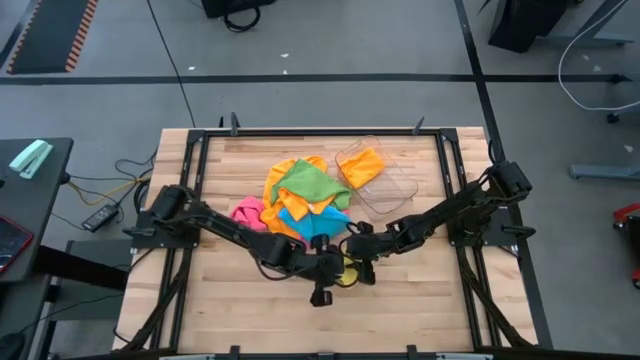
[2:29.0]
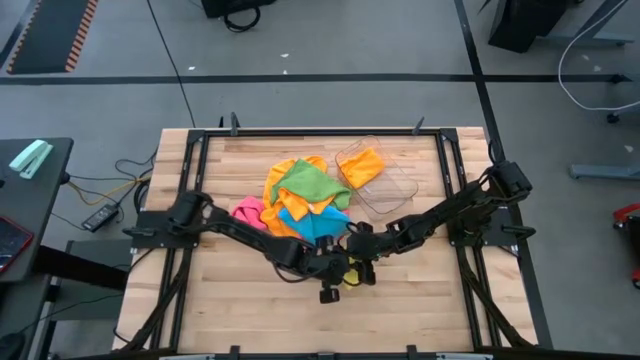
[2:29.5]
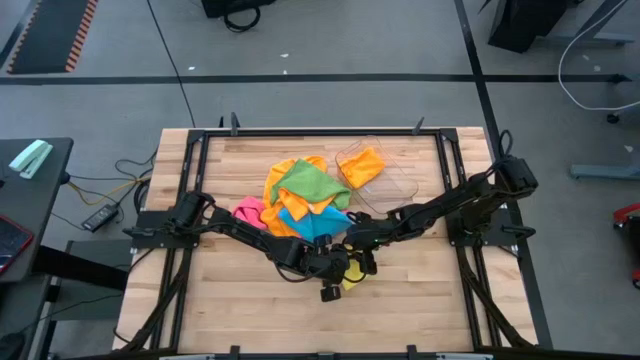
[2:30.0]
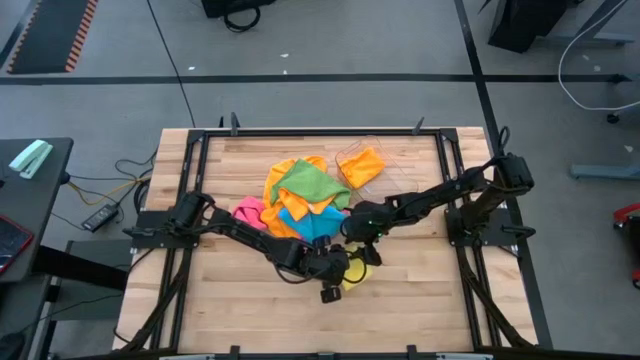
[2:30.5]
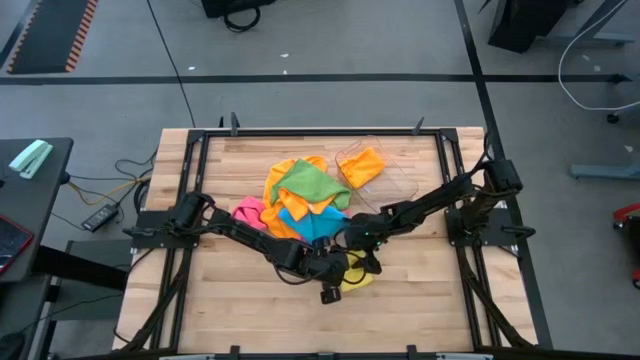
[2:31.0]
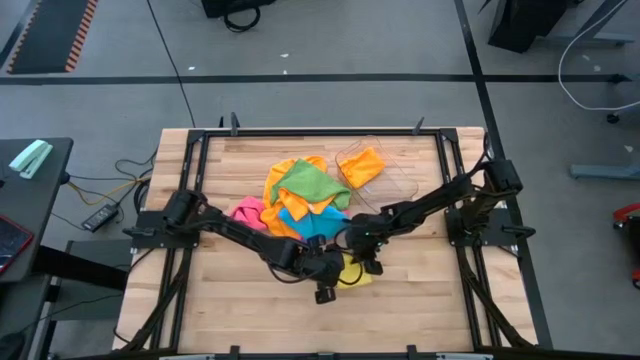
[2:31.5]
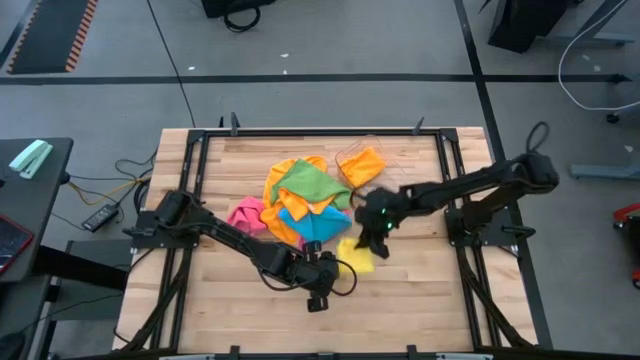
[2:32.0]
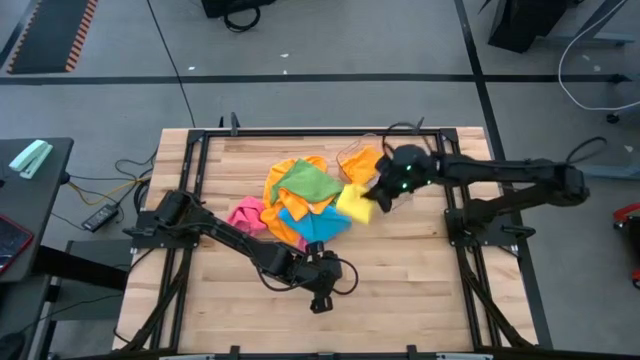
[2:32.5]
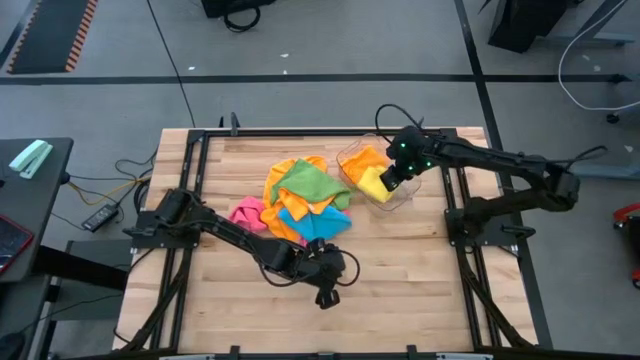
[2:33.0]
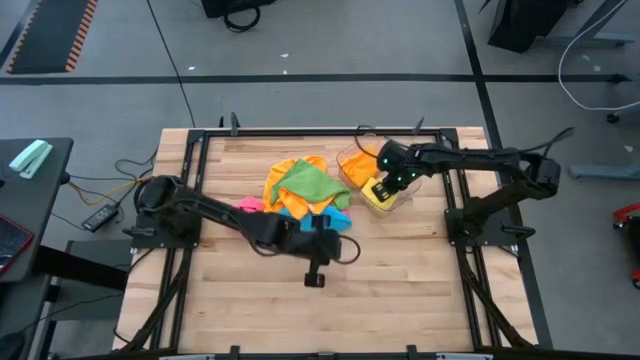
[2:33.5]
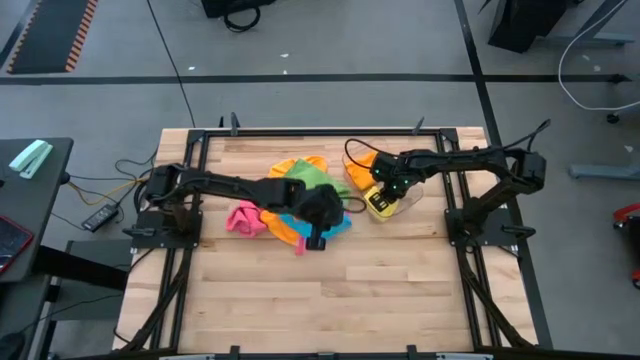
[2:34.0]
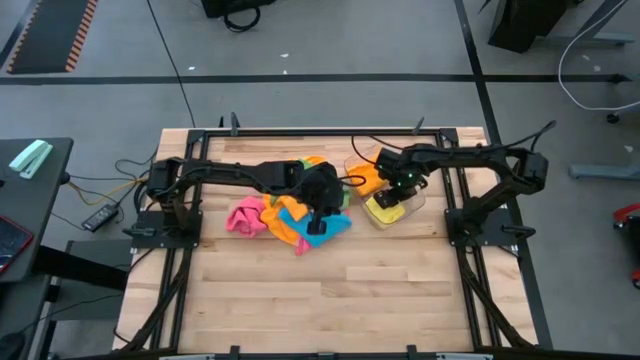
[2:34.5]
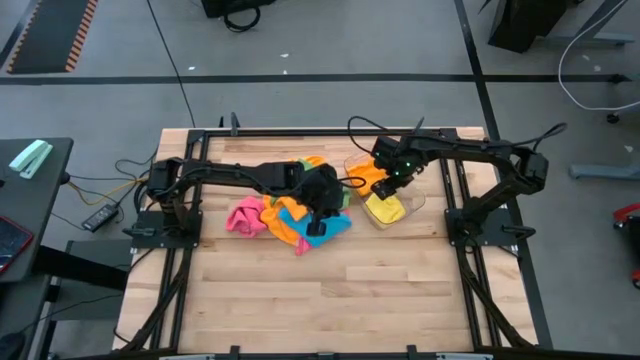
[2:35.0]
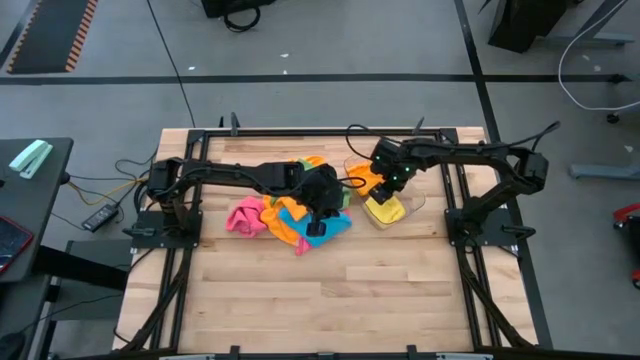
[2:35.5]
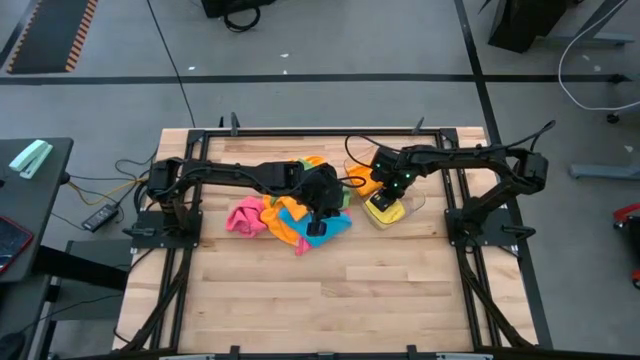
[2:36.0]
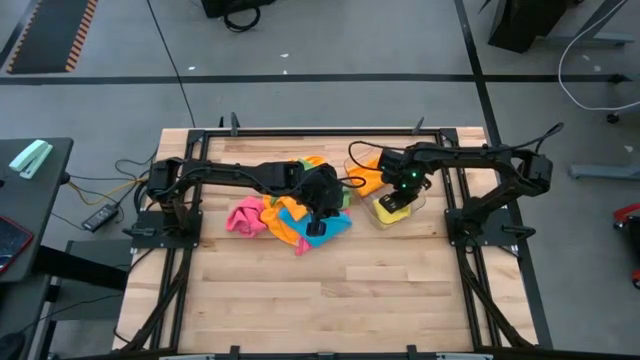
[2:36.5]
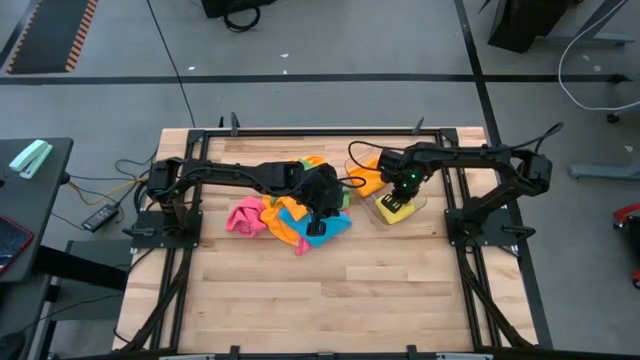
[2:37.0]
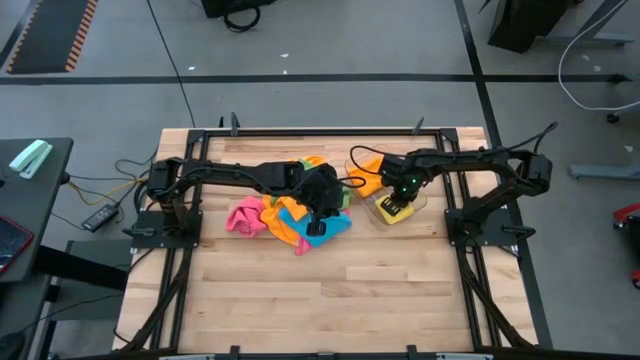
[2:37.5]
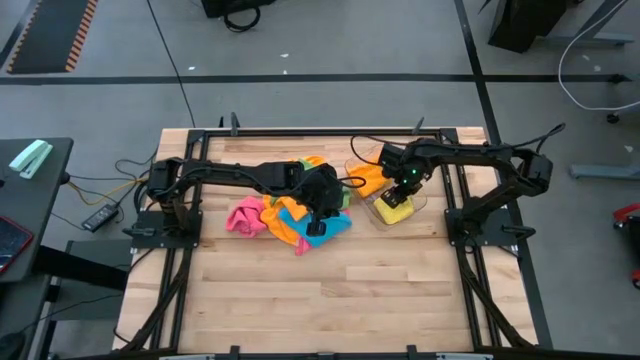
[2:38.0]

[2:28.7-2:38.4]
Task: Fold microfiber towels
Put the yellow towel into the transparent bin

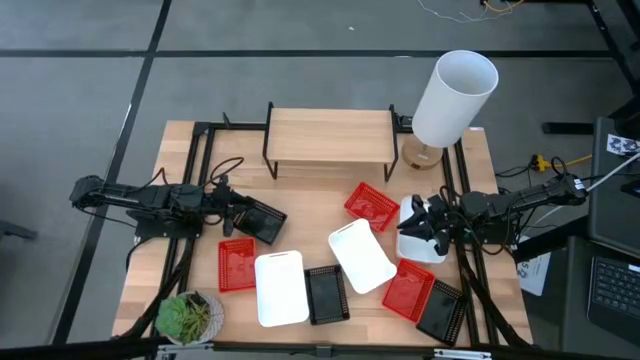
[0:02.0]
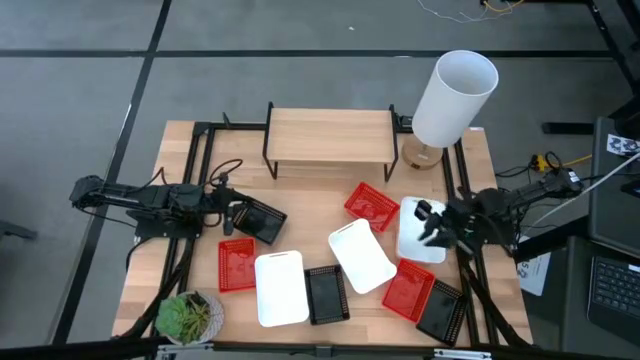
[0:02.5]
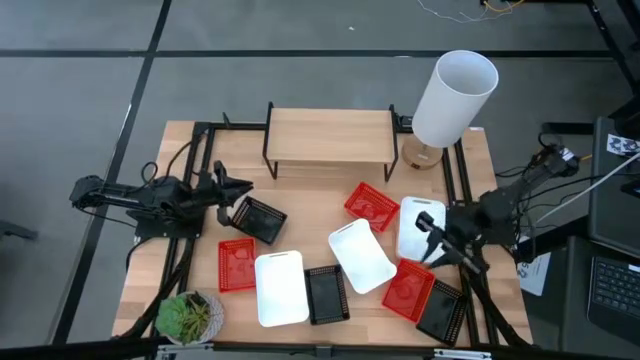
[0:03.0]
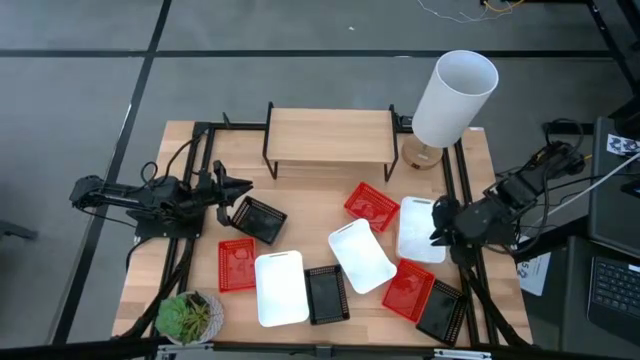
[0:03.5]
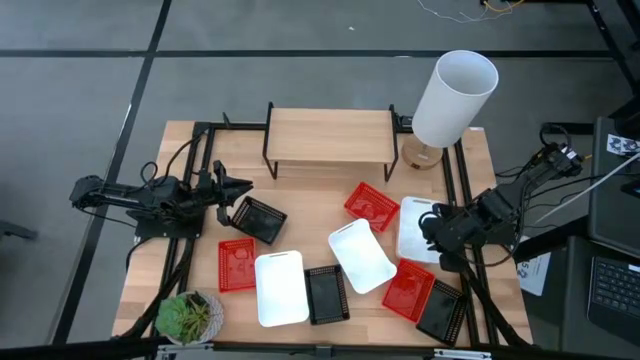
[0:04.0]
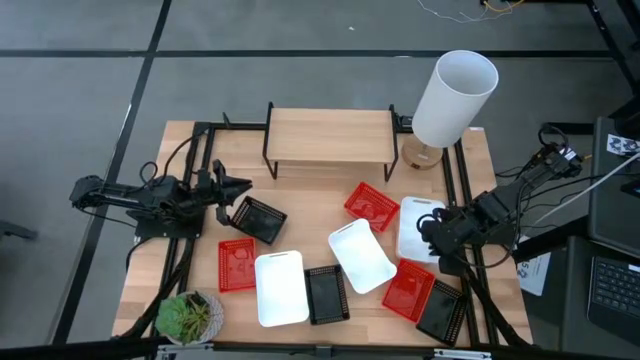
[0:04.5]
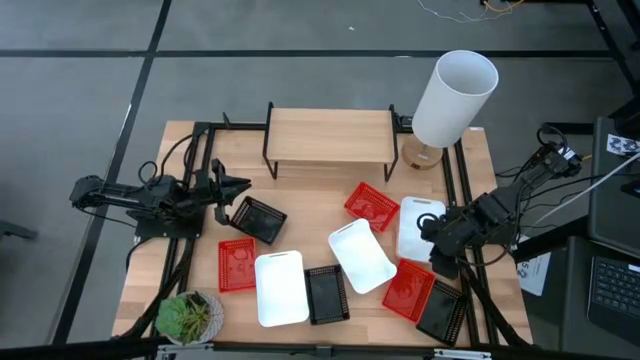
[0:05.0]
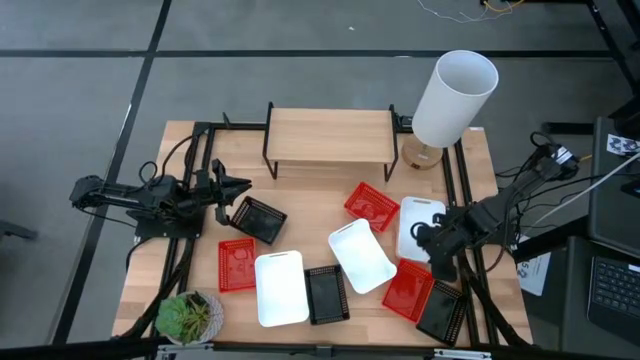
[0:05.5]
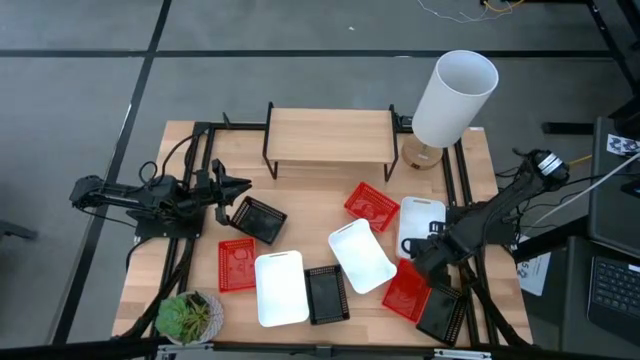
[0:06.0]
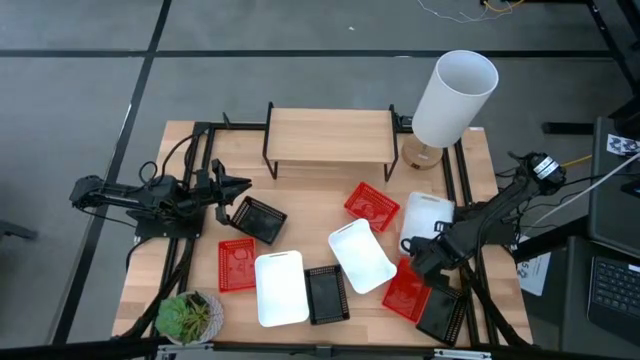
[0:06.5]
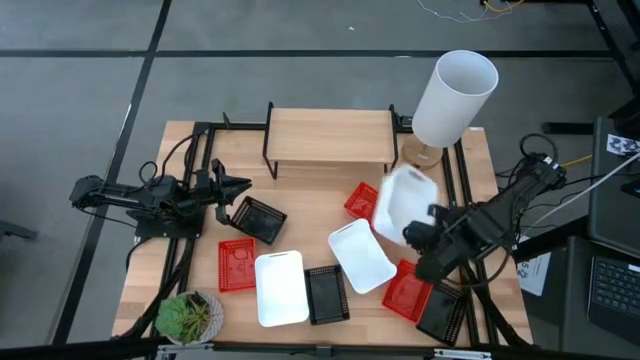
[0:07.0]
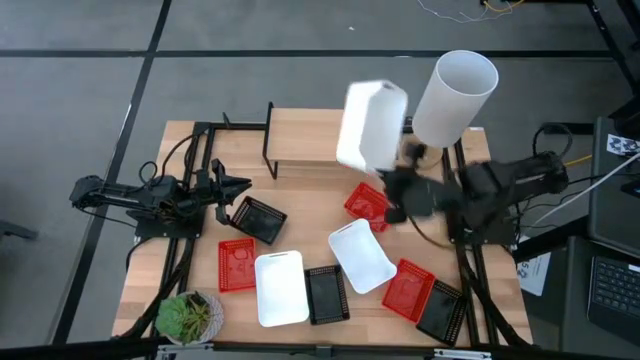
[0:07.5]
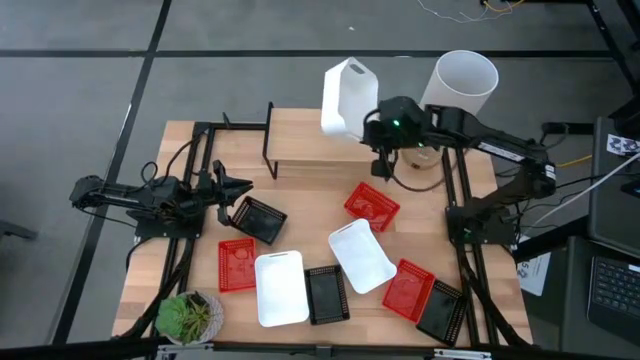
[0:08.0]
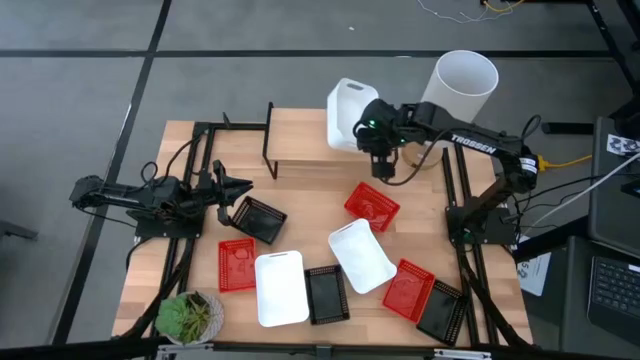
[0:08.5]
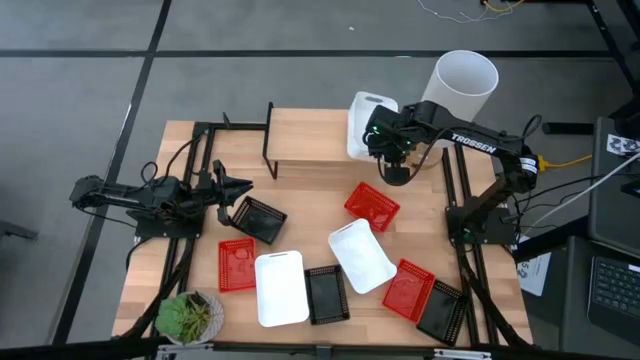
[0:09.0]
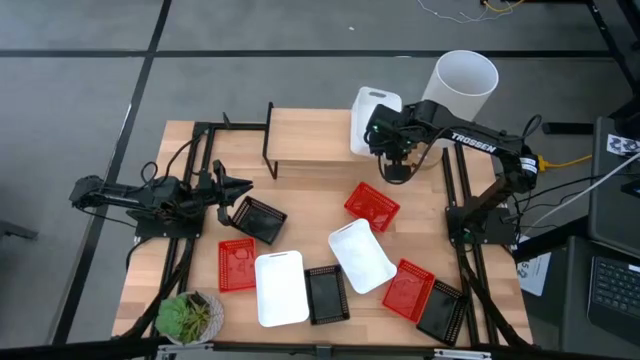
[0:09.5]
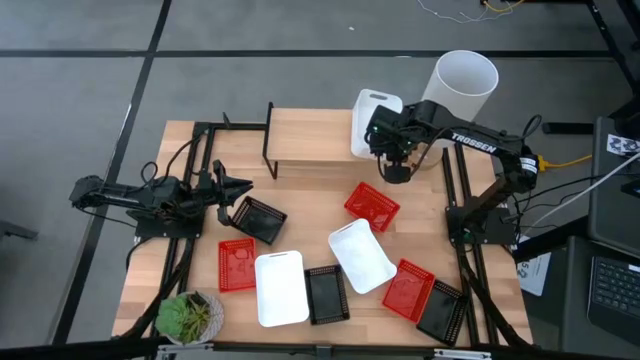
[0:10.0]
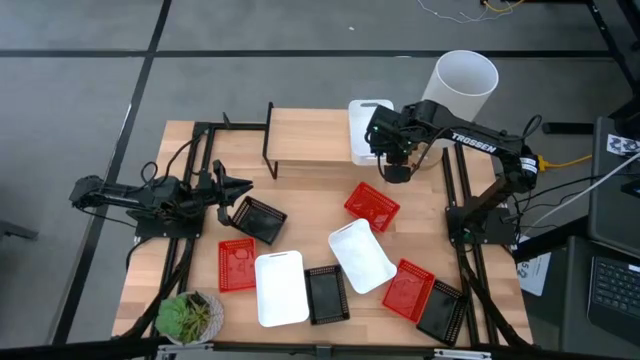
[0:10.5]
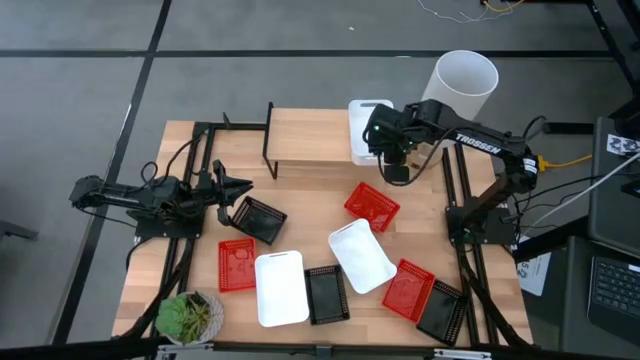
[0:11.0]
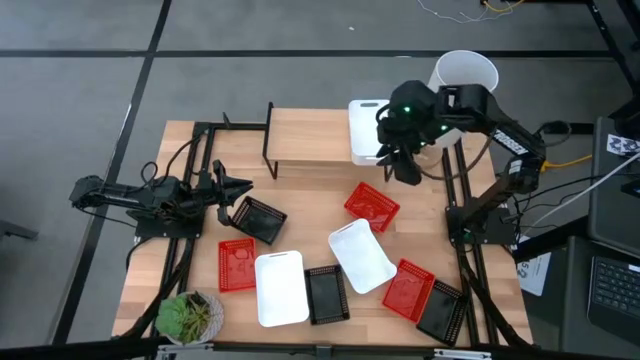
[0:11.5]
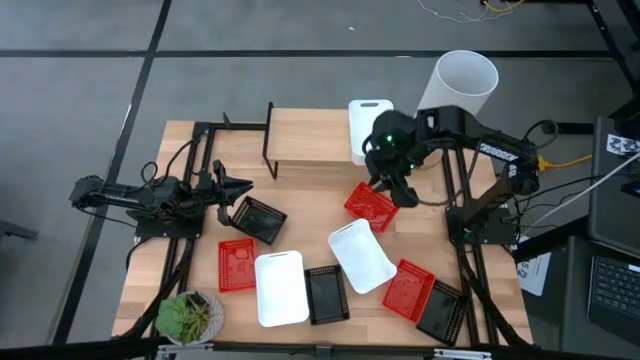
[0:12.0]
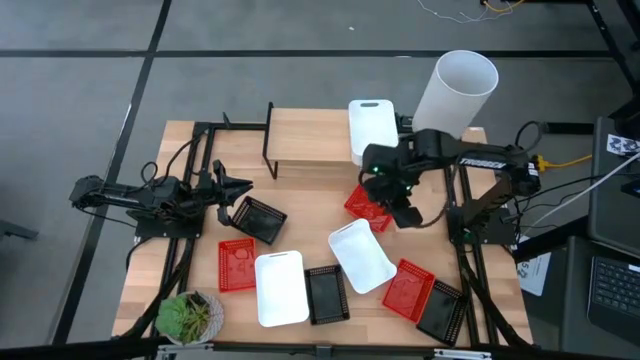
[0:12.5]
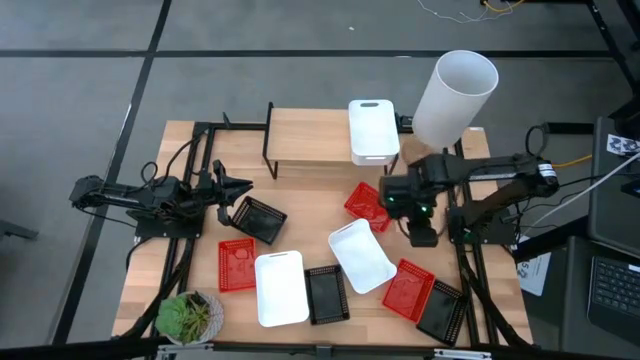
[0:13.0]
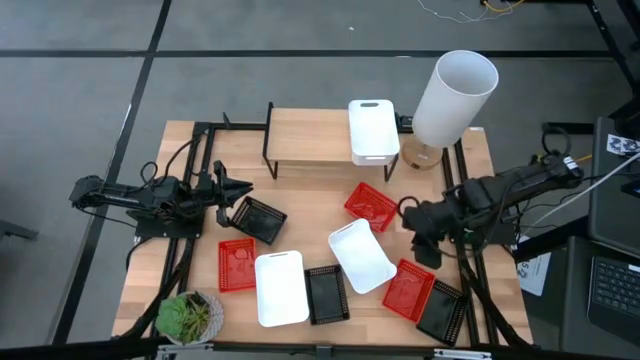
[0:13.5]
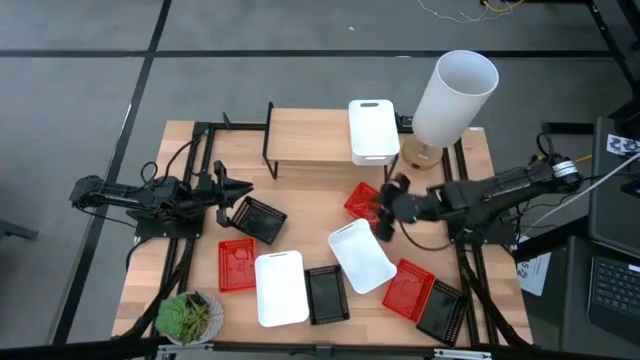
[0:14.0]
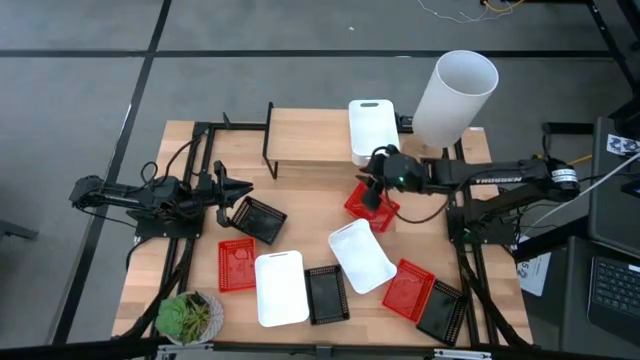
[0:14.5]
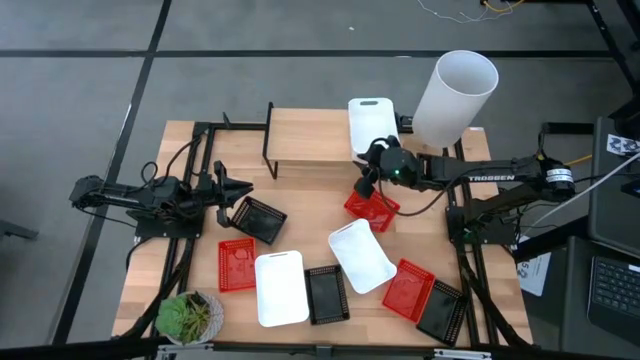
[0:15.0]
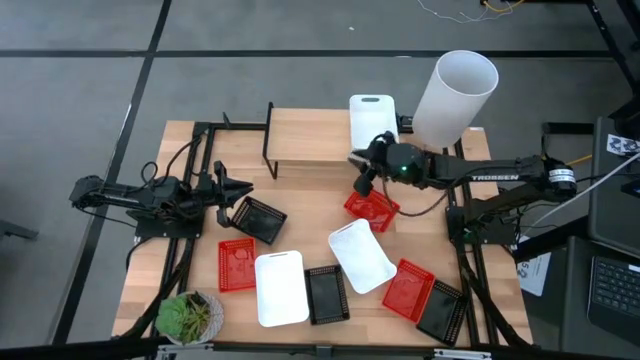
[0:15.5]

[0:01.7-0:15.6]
Task: Stack baskets on shelf by color
Put the right white bin on the shelf
